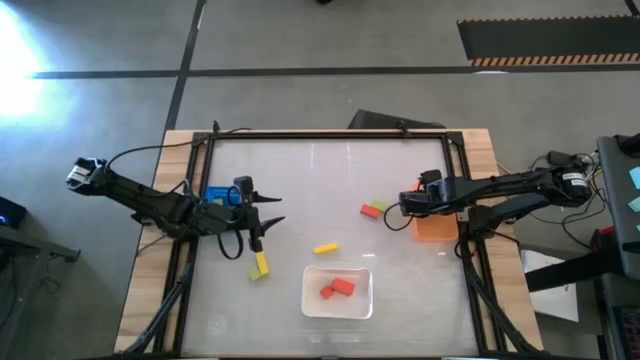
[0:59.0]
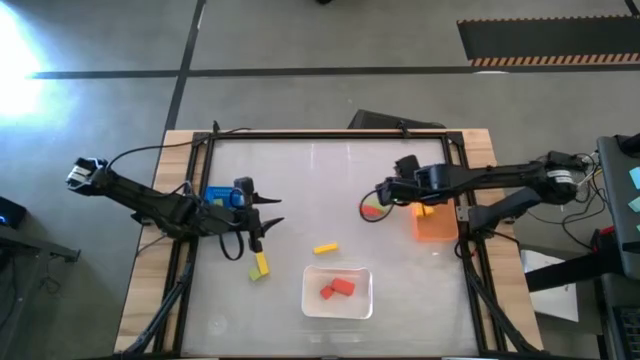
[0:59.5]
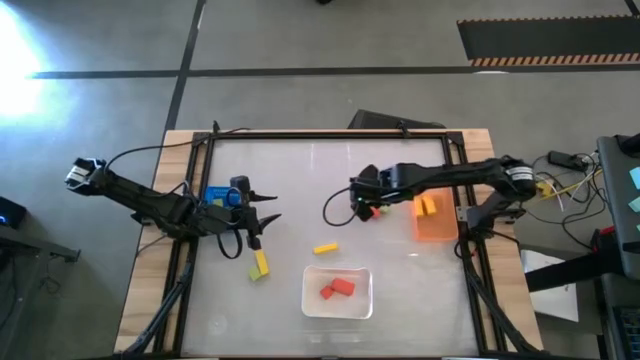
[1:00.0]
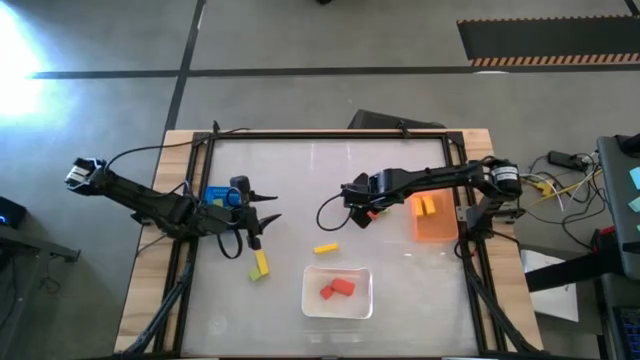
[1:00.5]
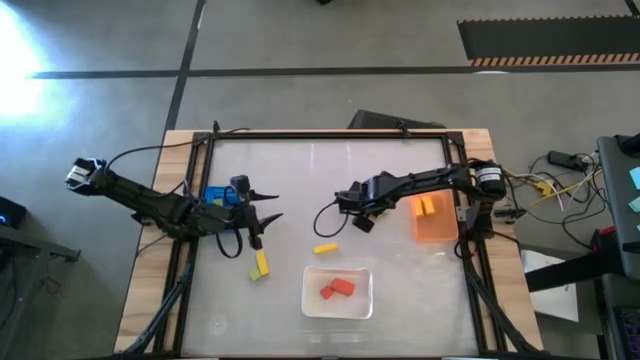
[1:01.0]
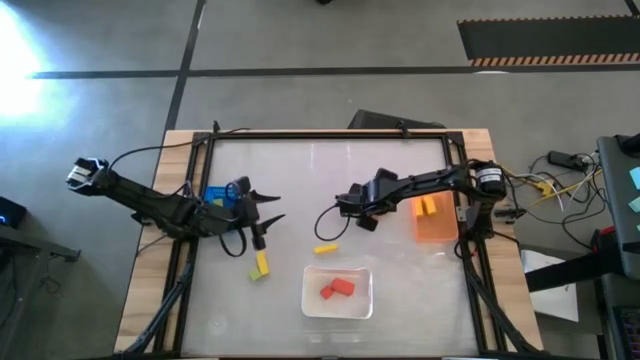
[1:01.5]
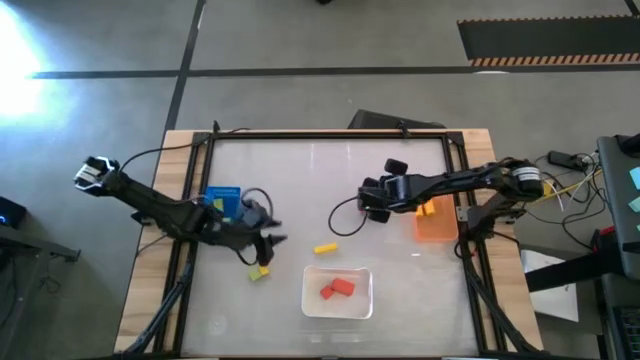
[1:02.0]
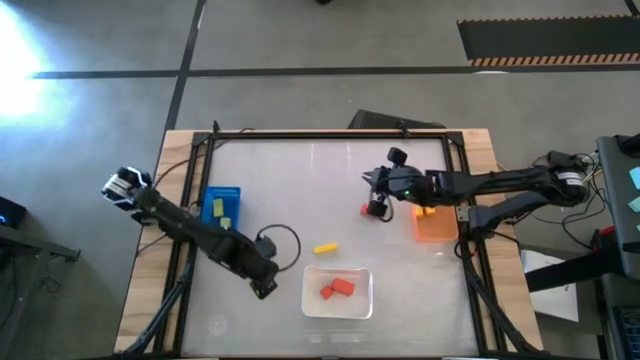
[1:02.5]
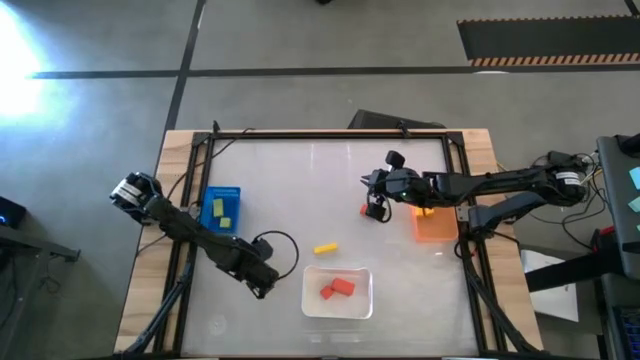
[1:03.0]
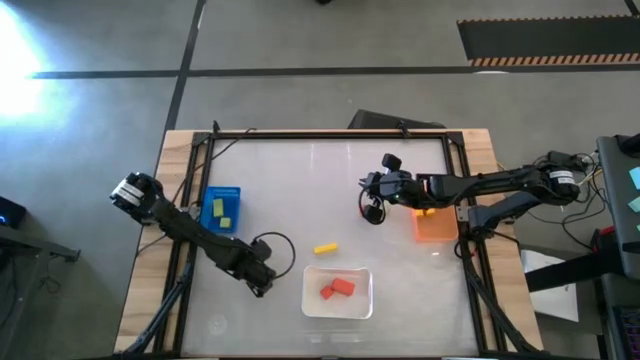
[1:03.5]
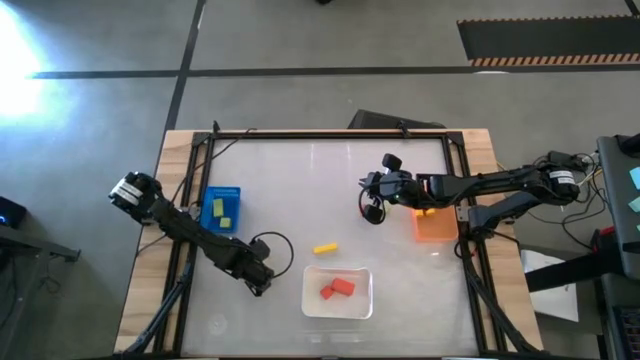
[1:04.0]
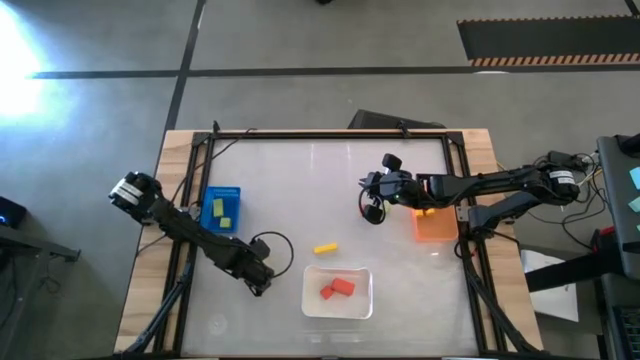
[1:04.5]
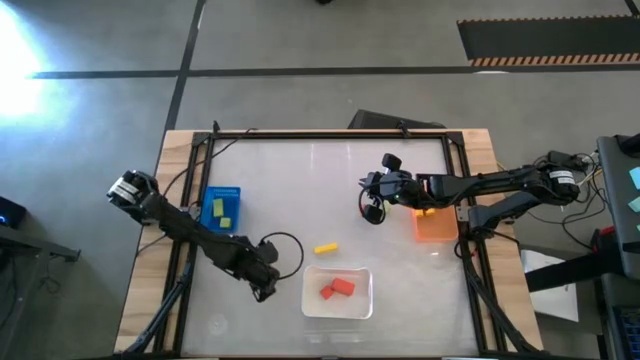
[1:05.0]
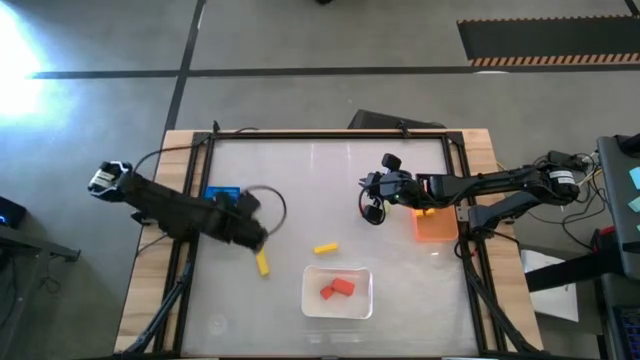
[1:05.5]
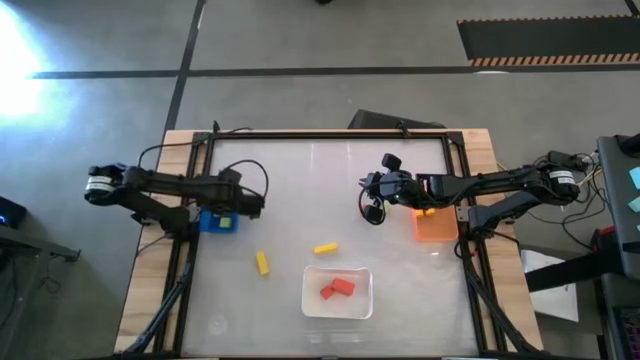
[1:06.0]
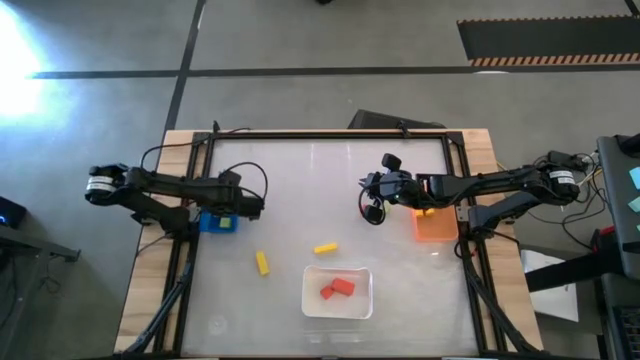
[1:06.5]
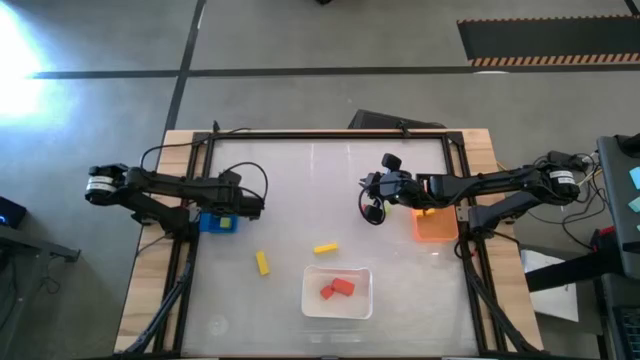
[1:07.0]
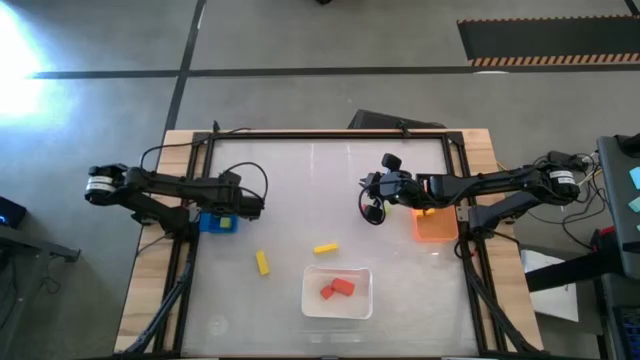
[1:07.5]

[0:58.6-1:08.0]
Task: Sort & place blocks by color
Put the green block into the blue bin

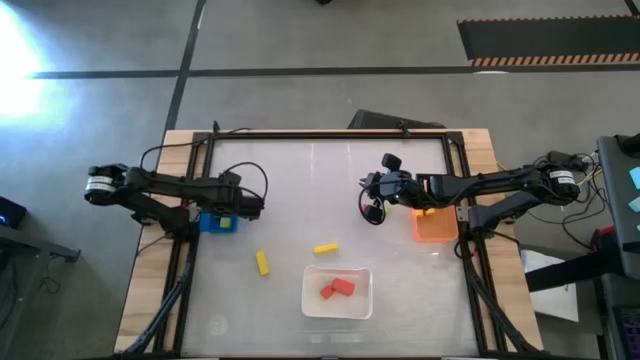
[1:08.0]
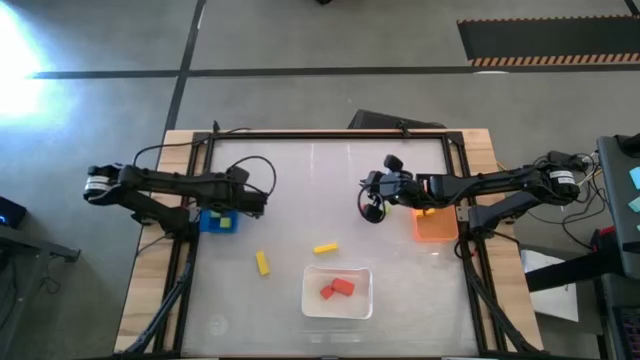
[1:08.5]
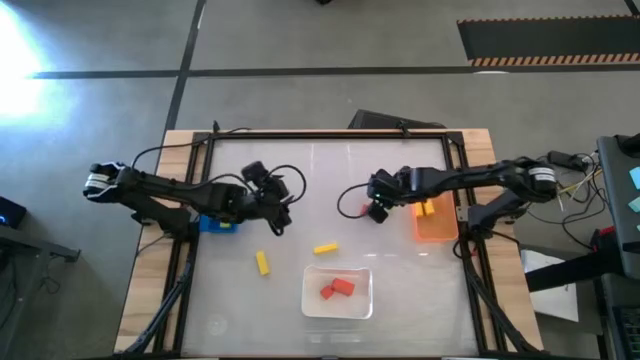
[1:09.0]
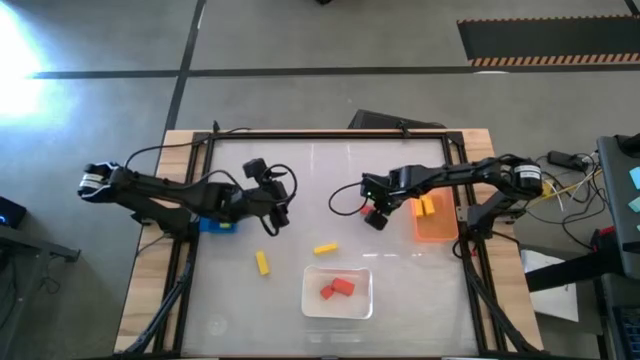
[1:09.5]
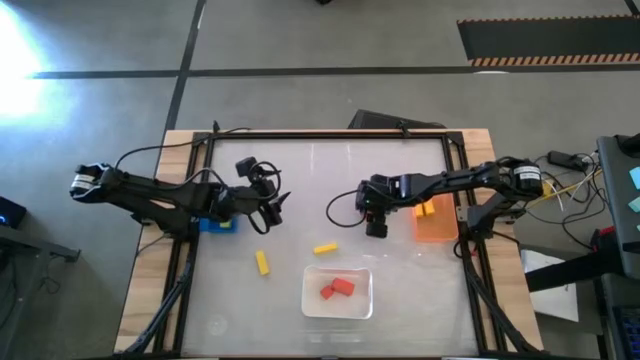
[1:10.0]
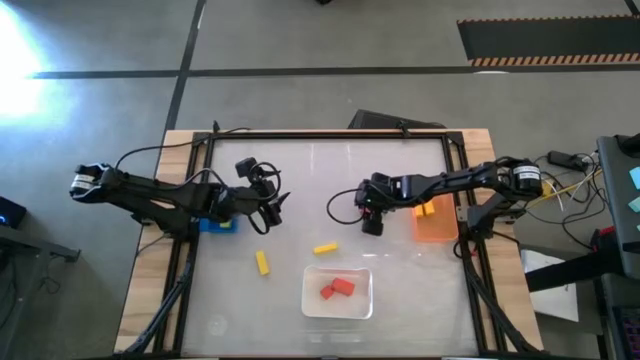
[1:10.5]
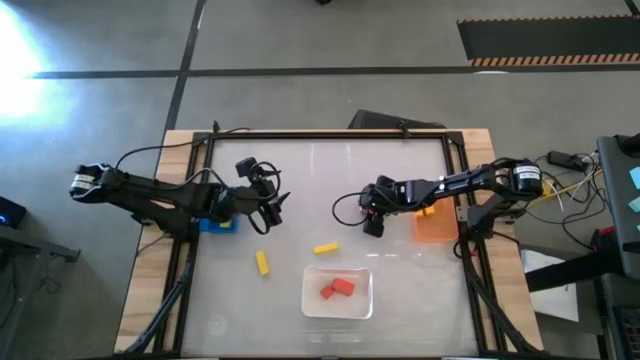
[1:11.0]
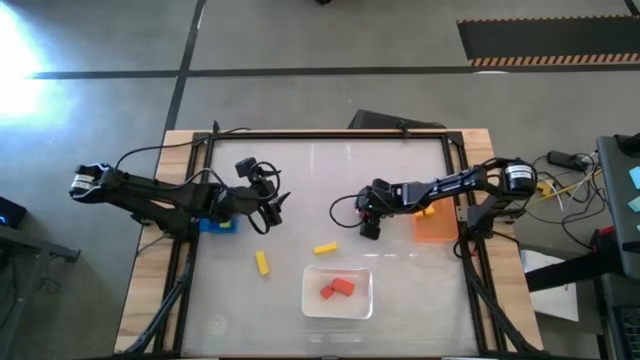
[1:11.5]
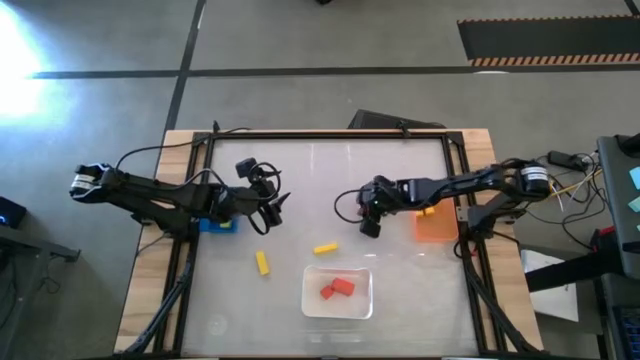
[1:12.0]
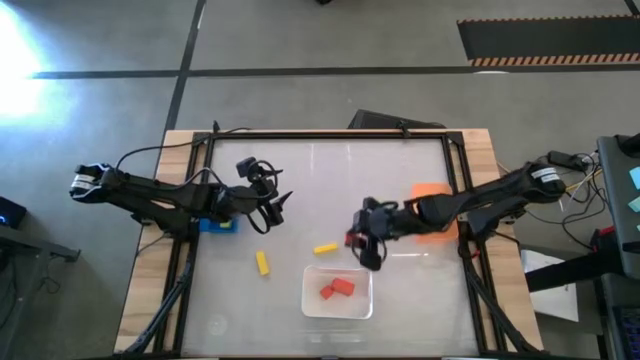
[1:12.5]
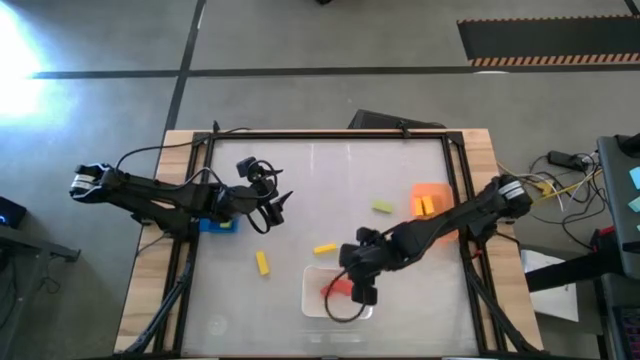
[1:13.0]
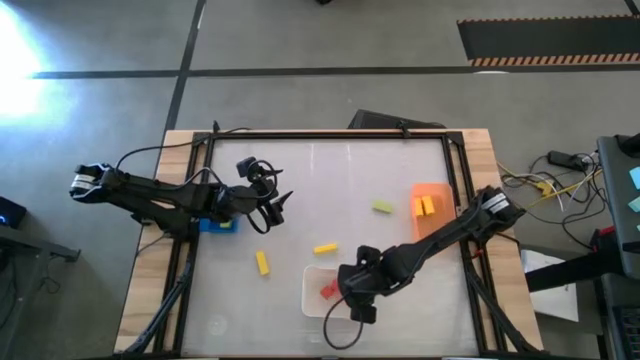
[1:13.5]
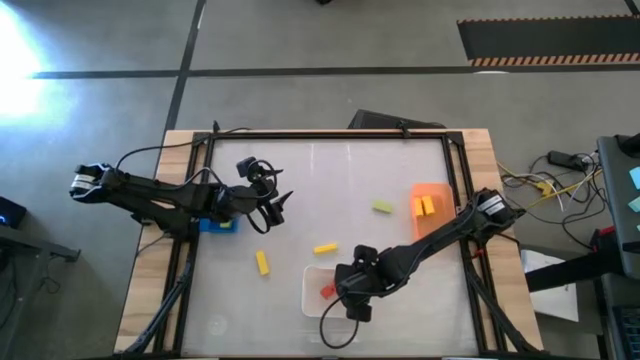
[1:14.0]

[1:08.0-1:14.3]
Put the orange block into the white bin

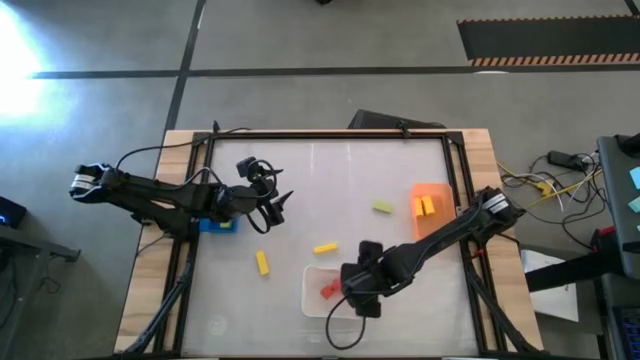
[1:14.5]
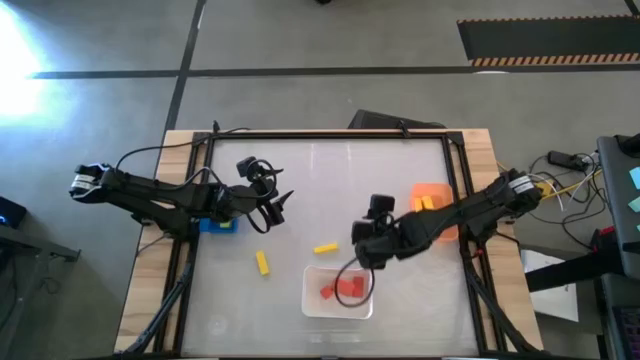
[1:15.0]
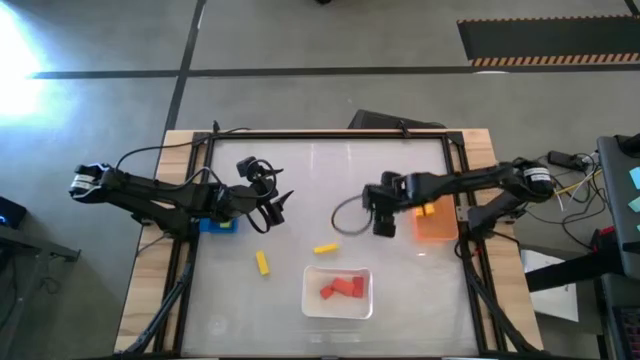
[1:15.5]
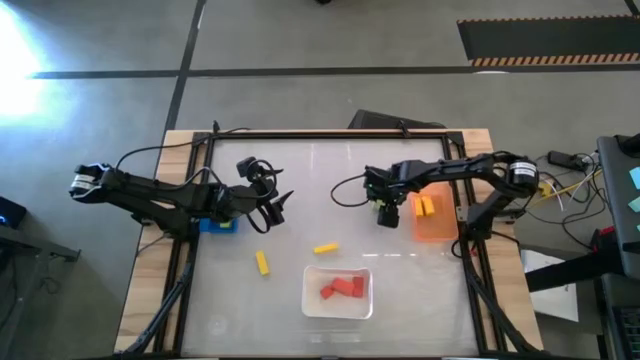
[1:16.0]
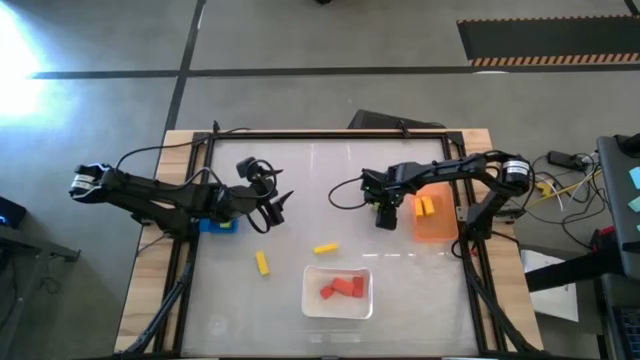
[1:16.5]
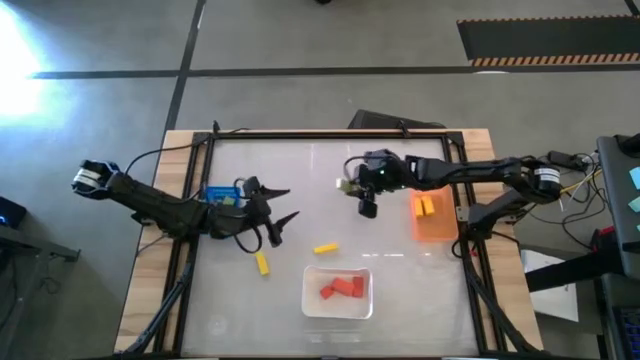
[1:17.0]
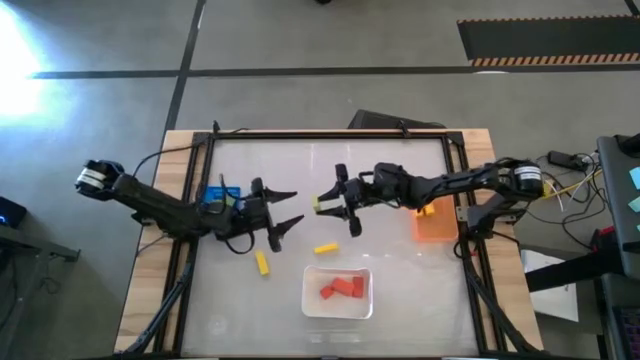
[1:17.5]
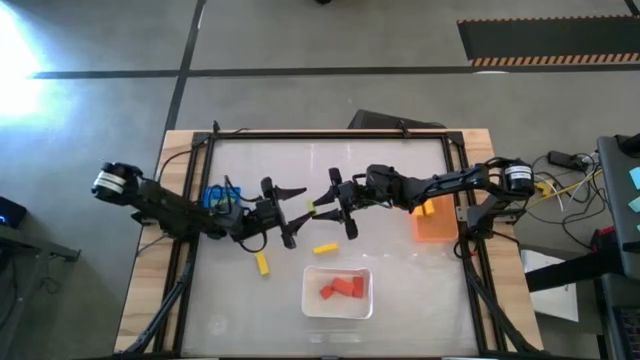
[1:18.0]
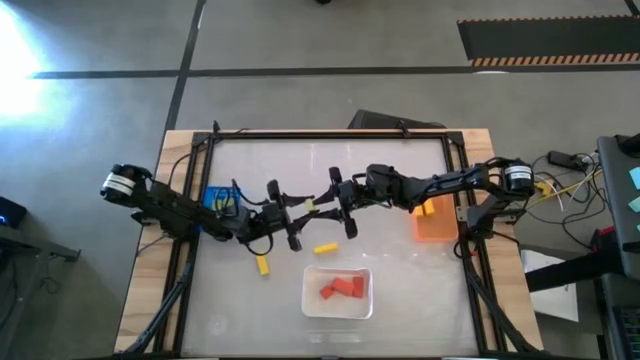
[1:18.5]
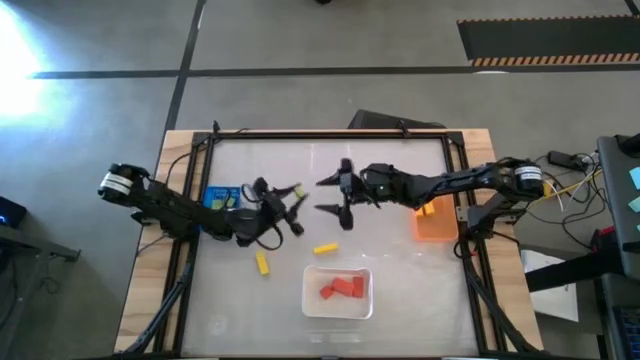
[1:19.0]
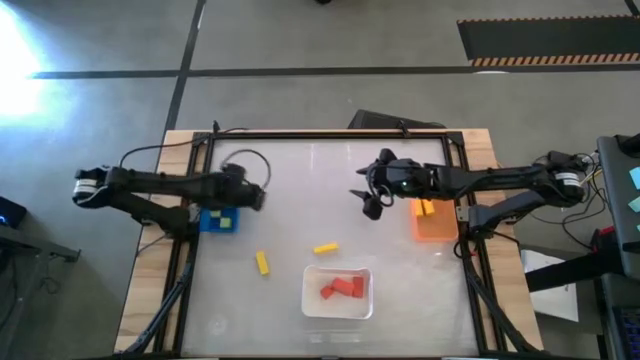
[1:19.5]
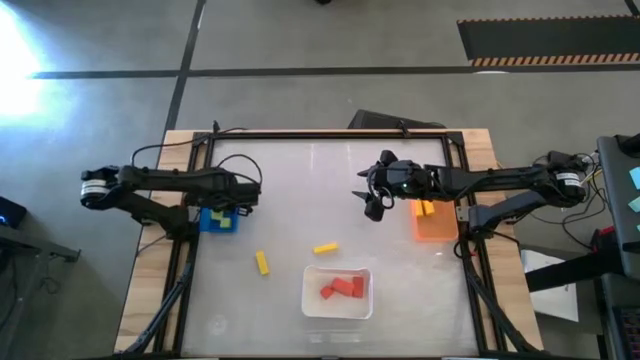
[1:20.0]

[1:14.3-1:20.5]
Put the green block into the blue bin
